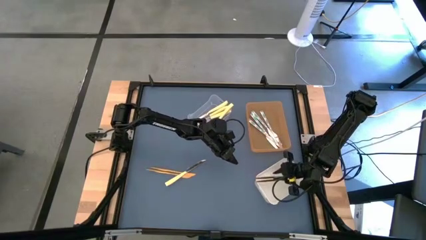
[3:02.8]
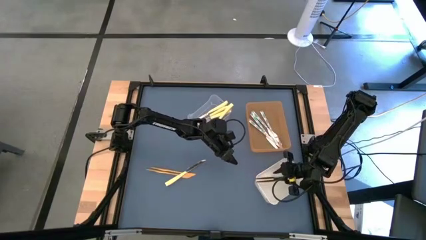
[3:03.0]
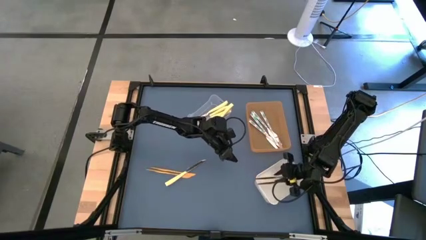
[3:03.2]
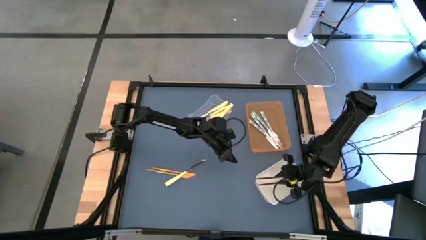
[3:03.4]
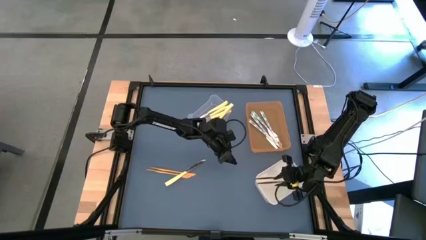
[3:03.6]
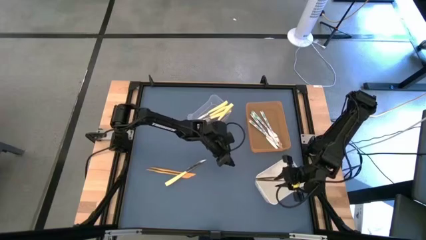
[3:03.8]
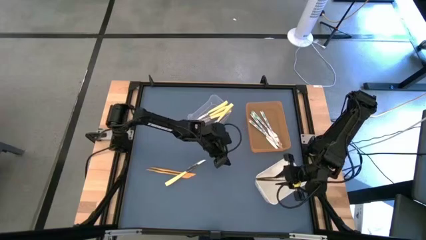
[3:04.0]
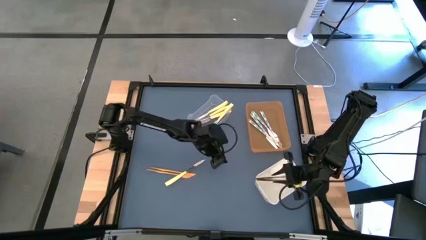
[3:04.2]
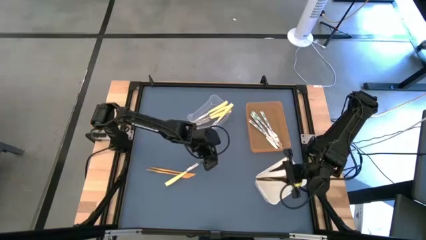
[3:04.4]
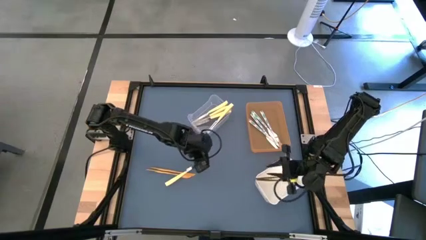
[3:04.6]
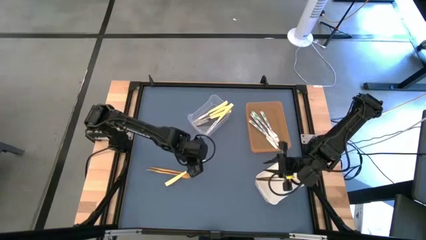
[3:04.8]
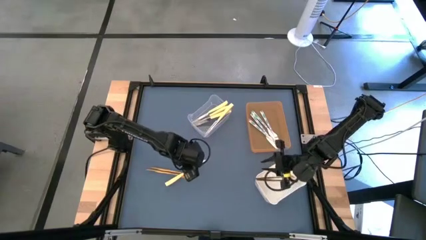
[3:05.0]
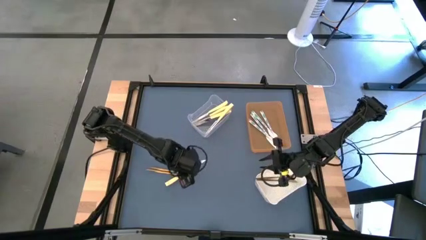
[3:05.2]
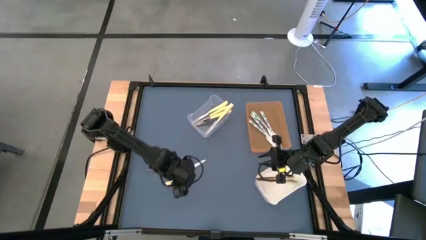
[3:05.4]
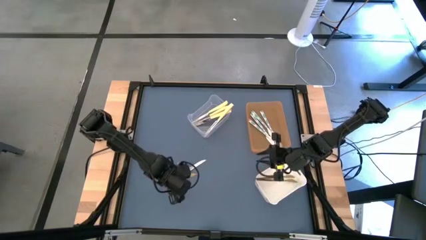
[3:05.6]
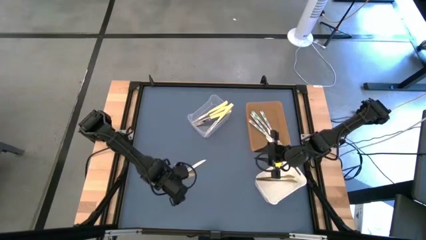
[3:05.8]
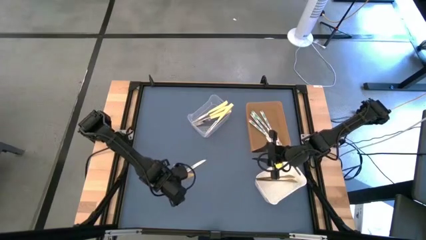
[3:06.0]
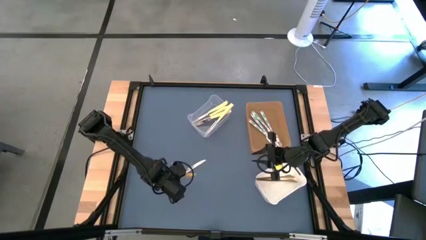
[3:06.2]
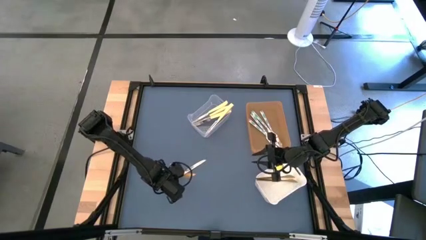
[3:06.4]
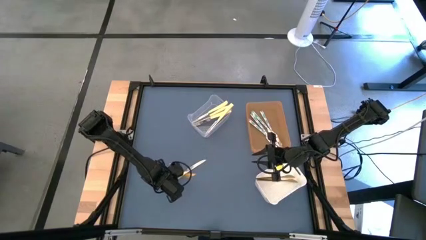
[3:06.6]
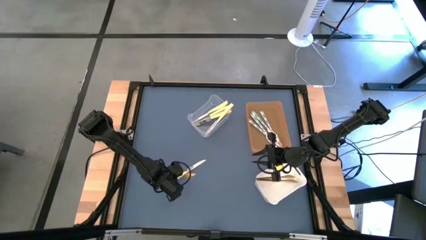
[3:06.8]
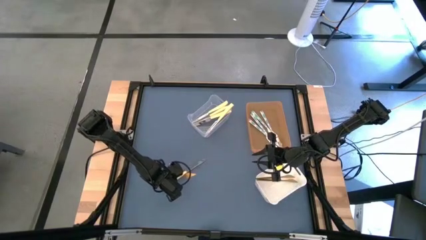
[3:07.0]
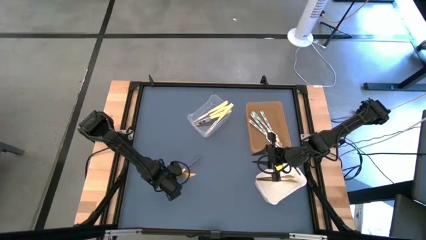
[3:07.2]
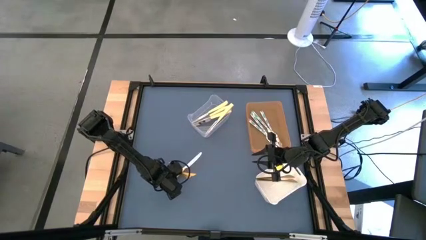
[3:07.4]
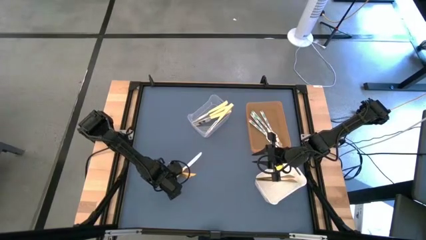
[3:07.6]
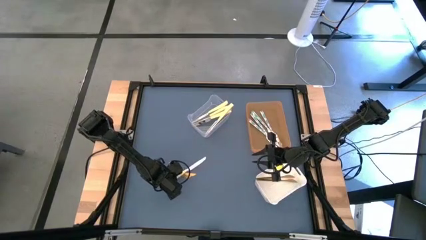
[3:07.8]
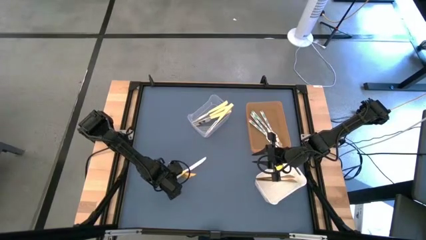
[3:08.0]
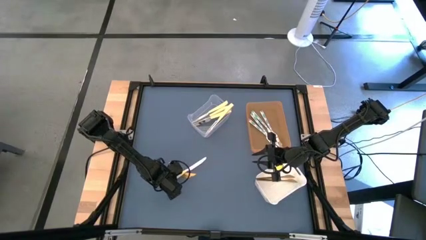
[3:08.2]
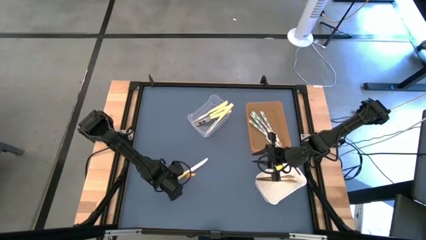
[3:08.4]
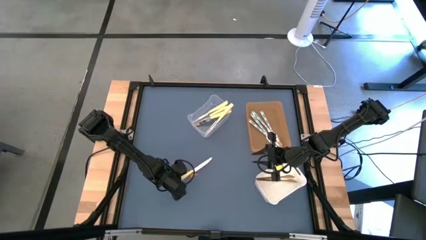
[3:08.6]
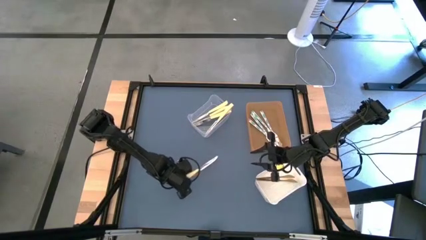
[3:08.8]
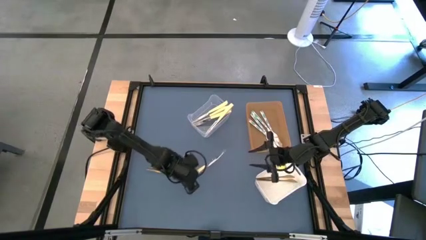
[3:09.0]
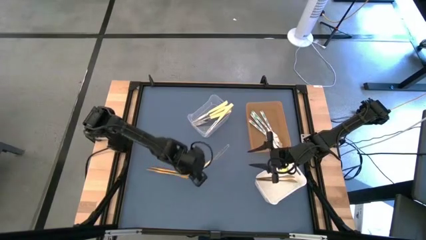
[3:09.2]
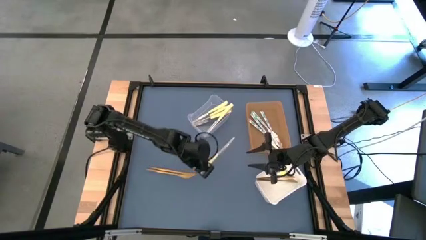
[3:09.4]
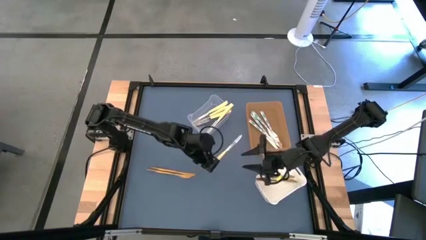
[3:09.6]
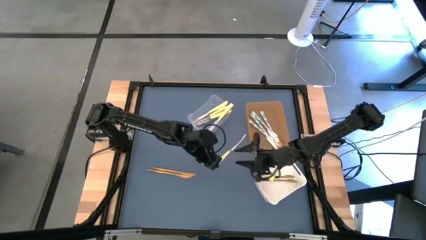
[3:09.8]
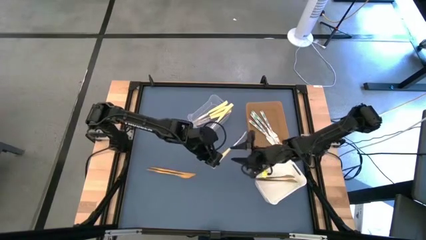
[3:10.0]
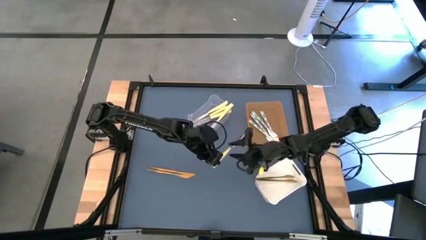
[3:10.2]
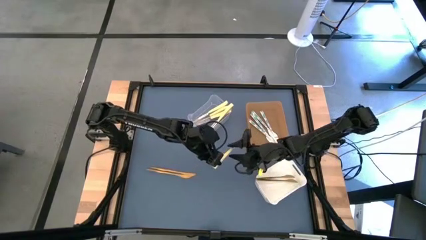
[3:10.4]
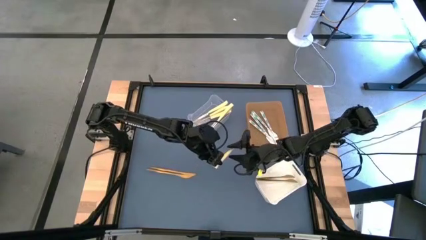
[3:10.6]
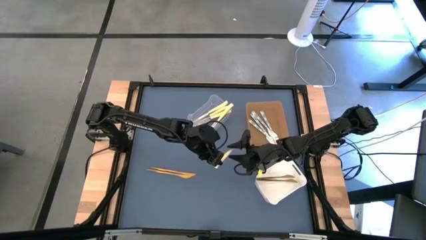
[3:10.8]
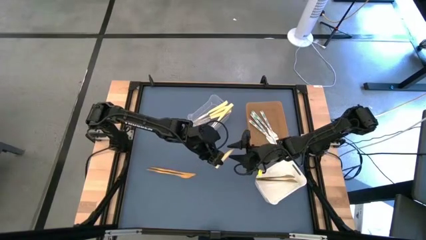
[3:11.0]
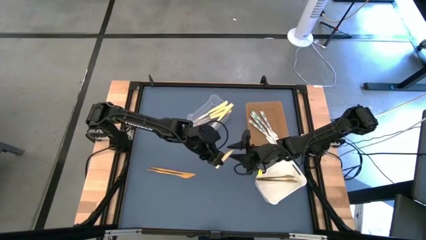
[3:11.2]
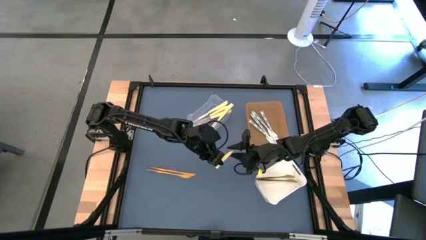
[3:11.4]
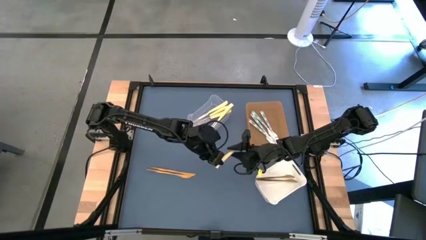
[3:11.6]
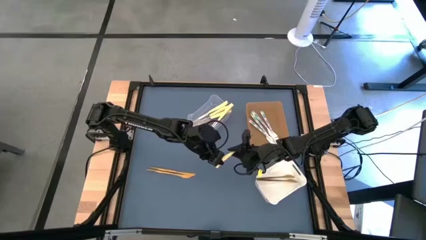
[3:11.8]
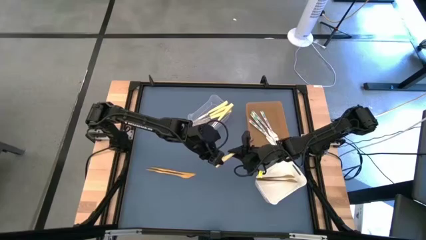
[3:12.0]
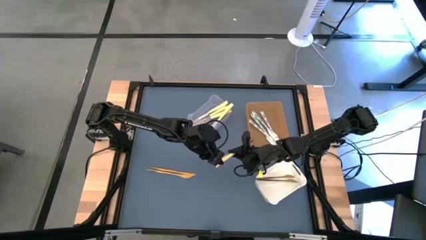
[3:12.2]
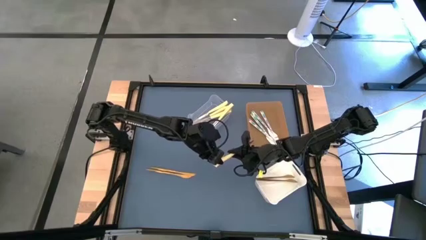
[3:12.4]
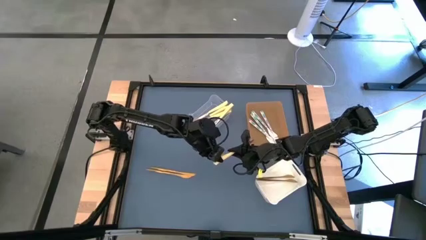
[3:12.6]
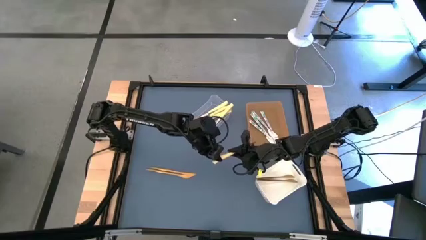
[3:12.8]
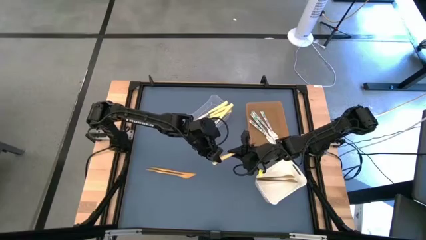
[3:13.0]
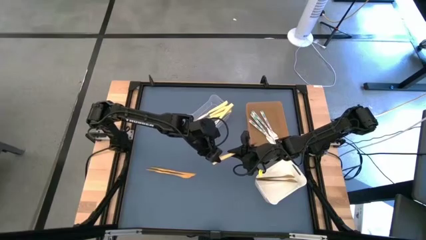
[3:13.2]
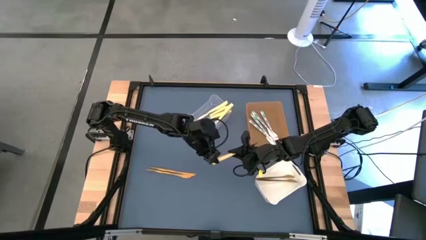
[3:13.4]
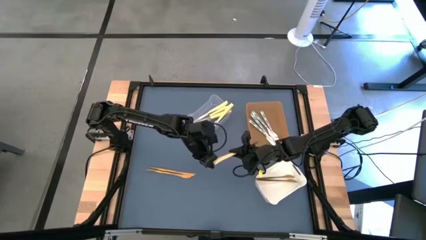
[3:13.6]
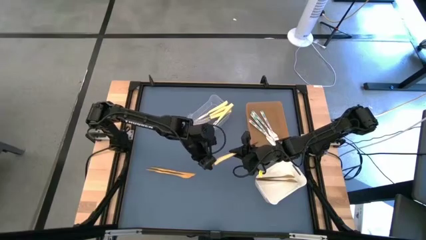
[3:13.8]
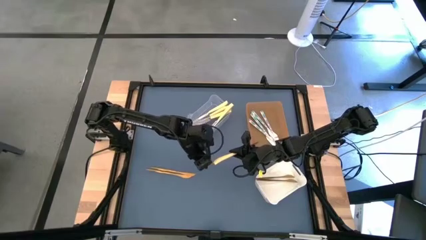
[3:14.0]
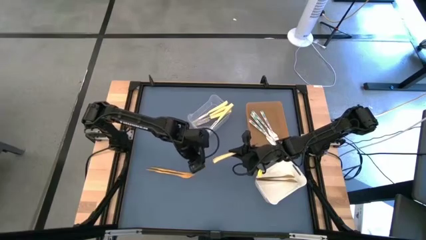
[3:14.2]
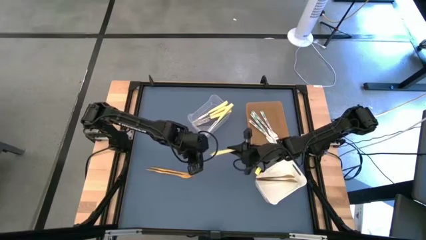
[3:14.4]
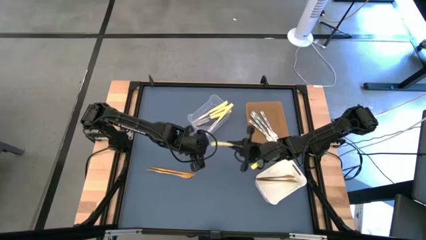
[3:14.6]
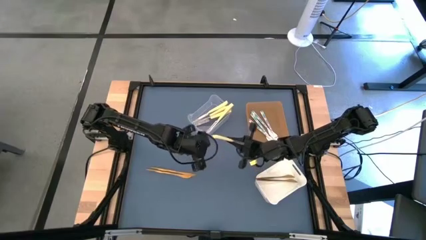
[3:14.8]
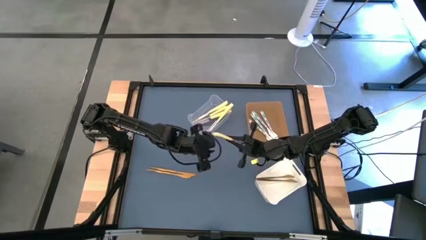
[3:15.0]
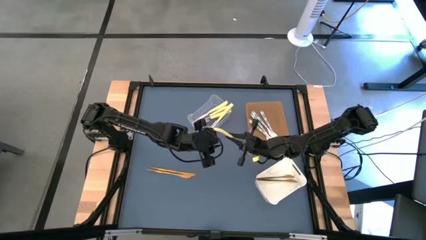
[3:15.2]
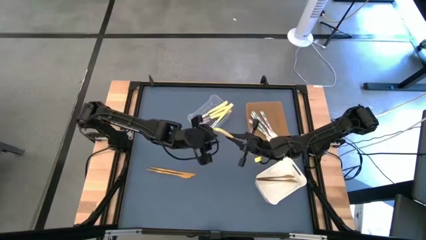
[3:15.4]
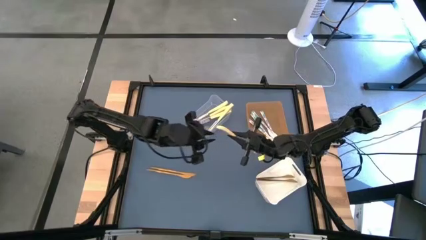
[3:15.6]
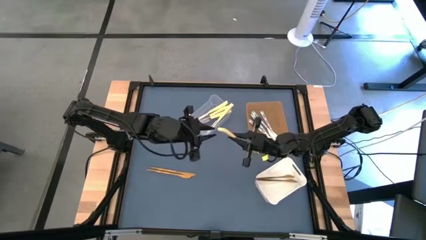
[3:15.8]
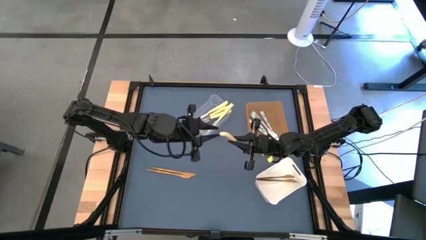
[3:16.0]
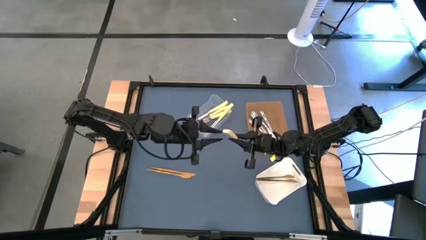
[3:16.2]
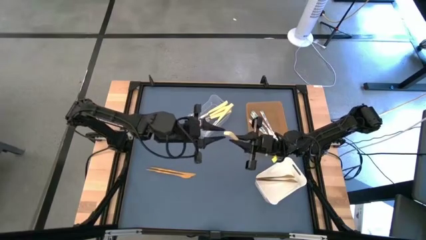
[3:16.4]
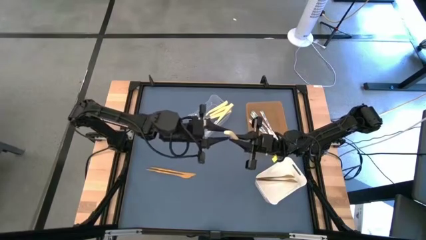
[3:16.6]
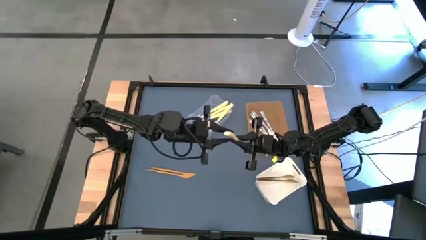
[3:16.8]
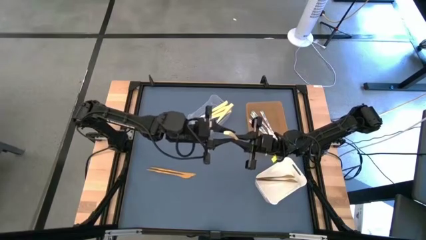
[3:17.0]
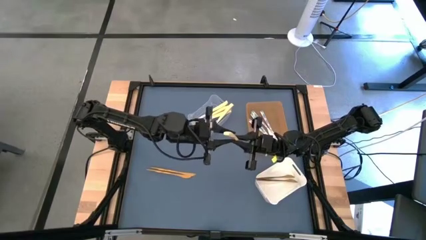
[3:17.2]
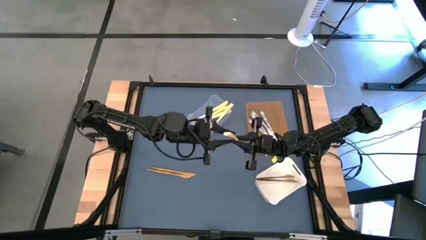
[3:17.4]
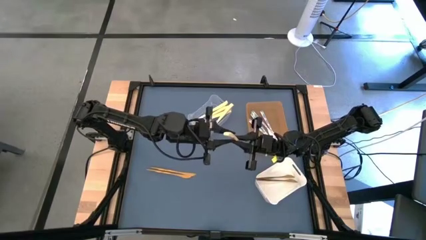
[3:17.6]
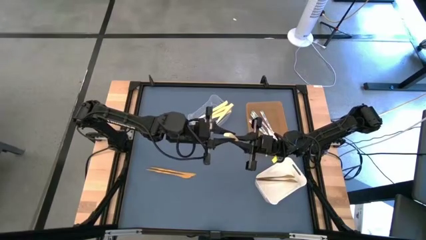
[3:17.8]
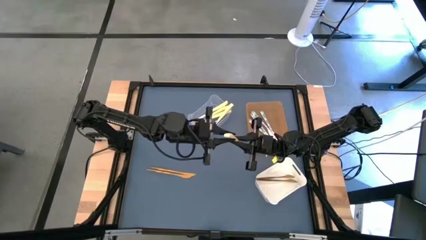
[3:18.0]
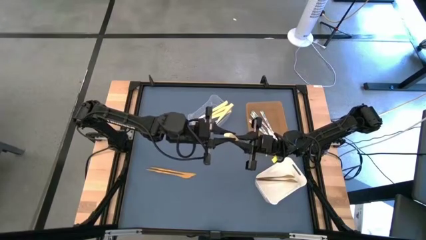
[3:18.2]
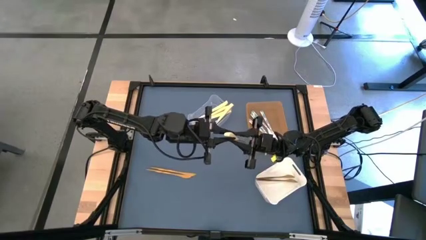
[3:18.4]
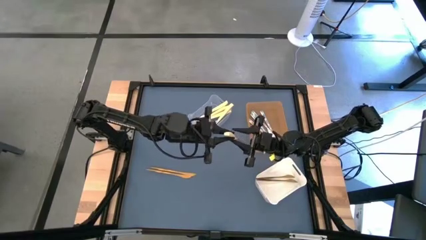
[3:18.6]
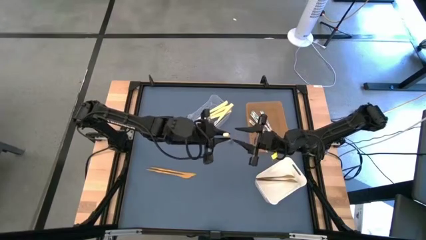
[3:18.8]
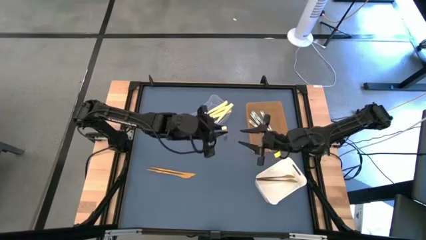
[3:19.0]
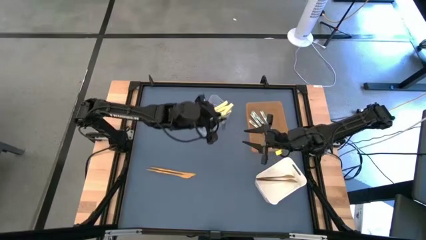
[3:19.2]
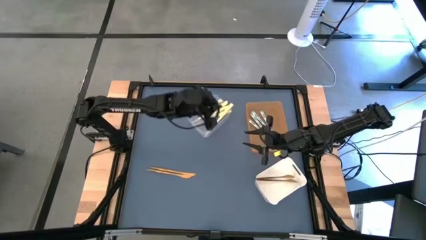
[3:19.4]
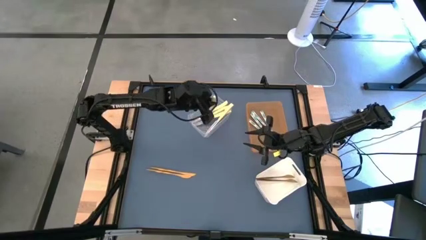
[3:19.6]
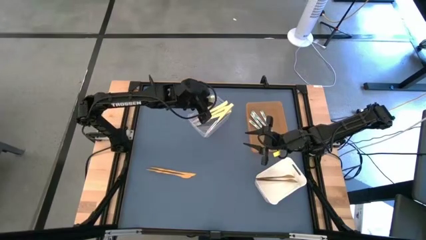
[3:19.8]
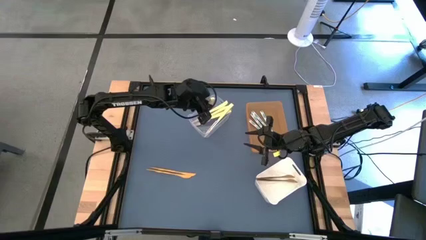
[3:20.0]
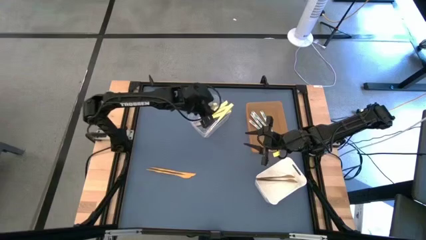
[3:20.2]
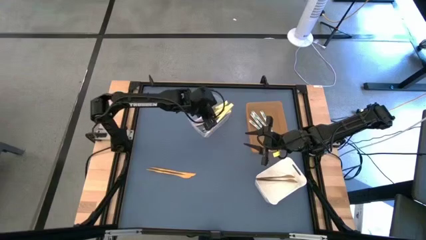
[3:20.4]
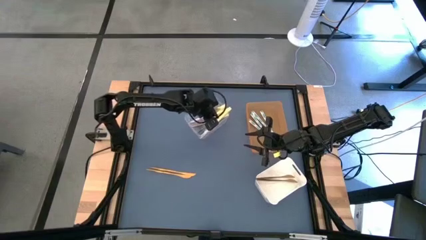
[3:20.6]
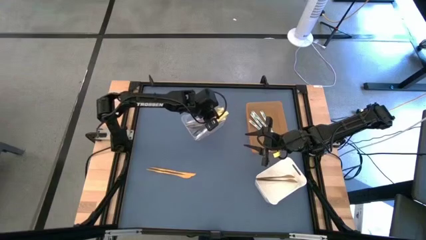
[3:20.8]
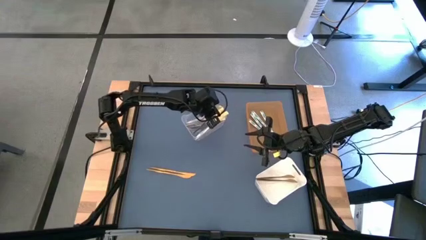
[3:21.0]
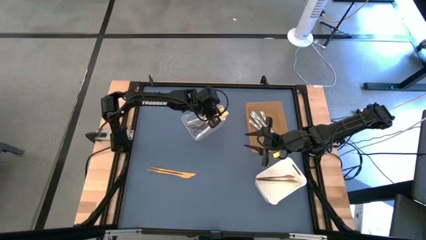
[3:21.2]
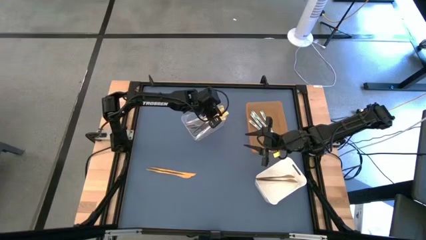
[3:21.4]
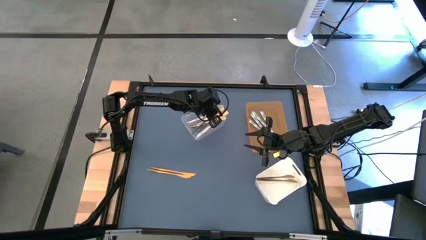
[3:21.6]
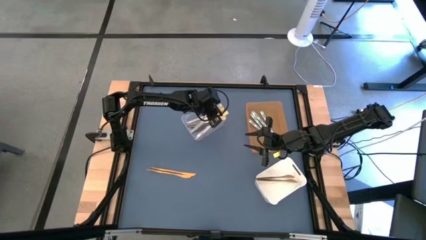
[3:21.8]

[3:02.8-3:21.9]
Task: Sort silverware by color (type)
Put the yellow knife into the transparent bin
